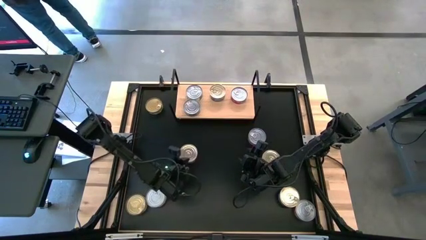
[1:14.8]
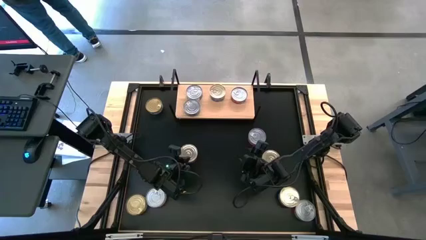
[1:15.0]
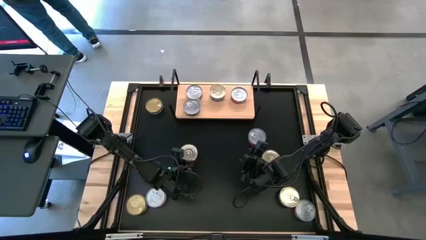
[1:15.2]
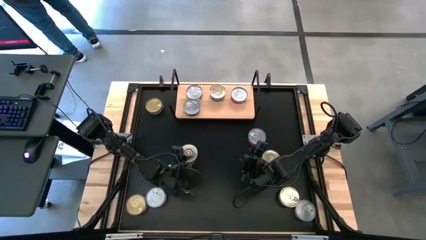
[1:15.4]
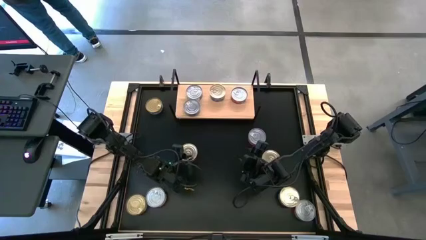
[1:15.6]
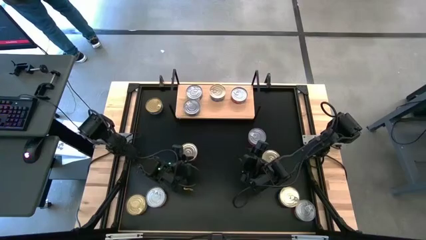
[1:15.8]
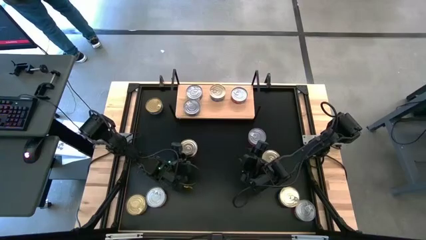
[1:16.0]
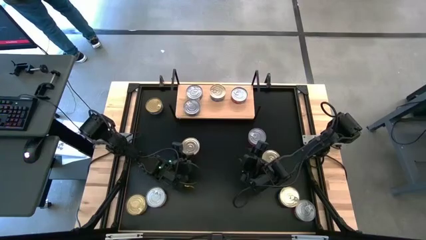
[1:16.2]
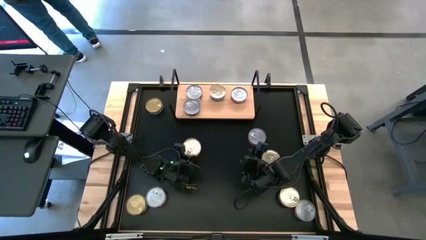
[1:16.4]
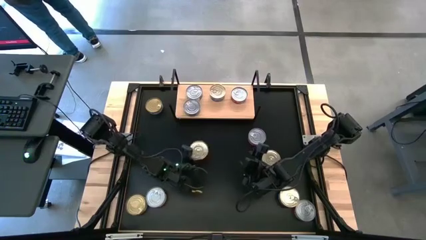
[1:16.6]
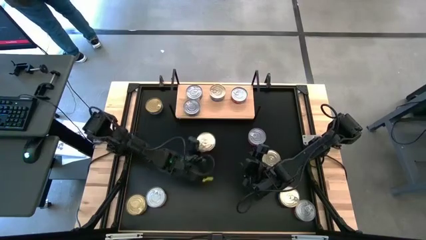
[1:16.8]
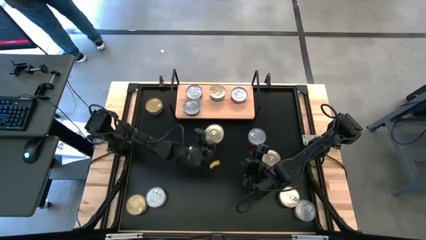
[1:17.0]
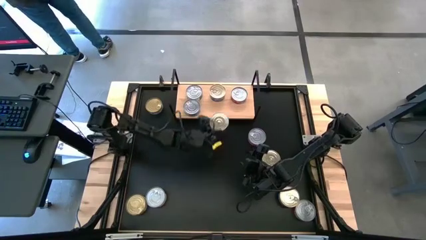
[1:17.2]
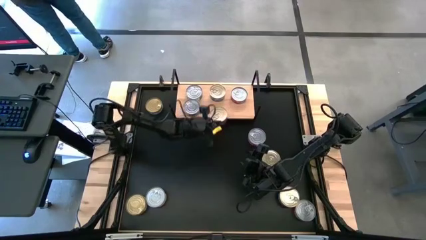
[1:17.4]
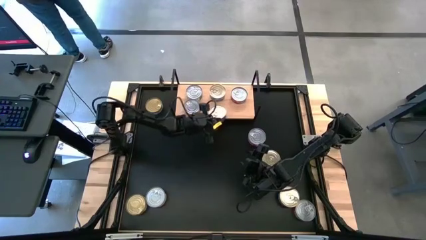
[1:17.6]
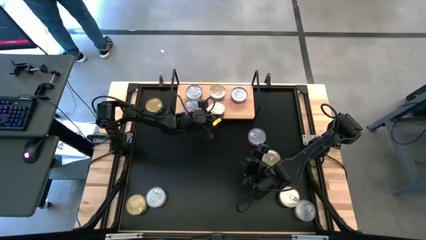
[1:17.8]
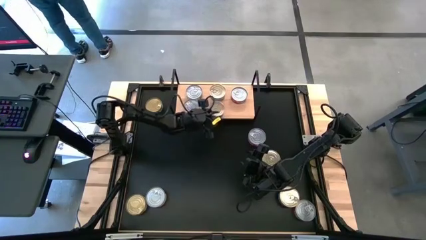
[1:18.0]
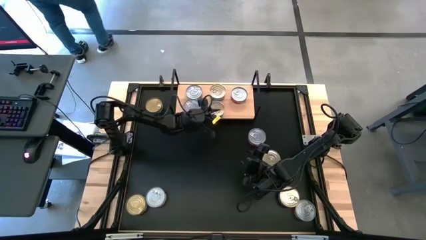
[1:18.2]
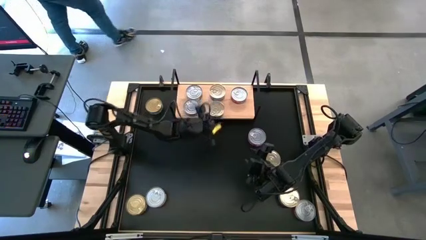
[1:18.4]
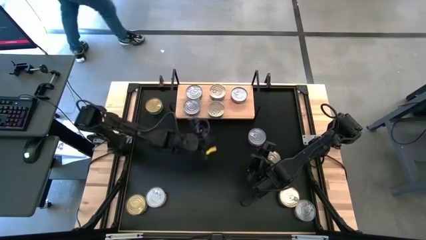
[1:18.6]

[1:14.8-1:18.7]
Task: Stack canned seafood by type on shelf
Put the blue-pink tuna can on the shelf

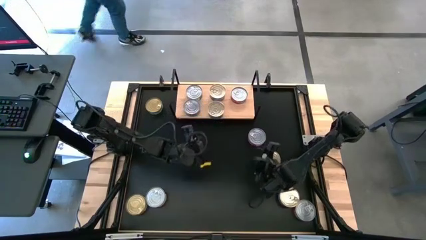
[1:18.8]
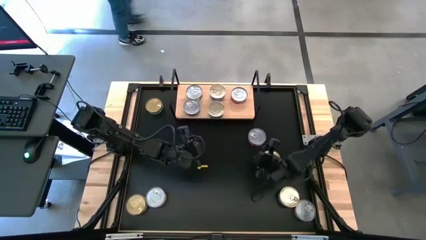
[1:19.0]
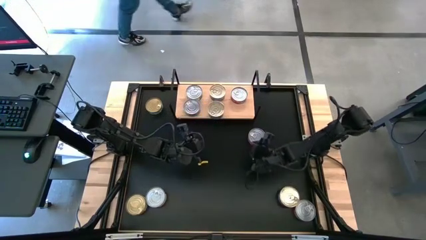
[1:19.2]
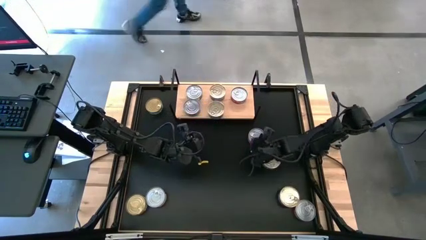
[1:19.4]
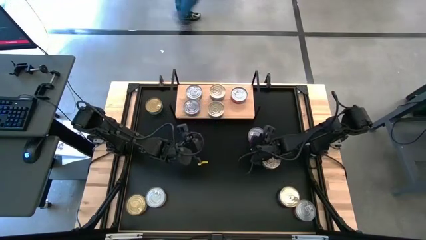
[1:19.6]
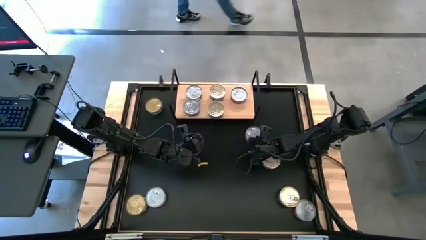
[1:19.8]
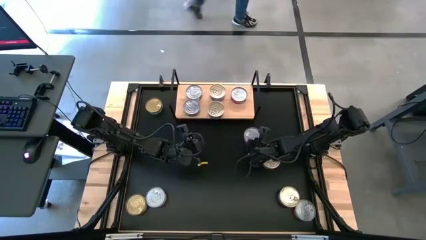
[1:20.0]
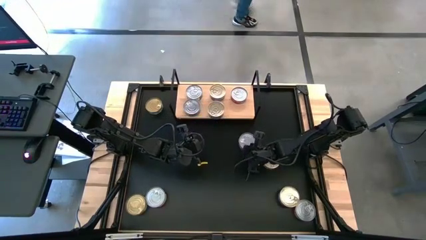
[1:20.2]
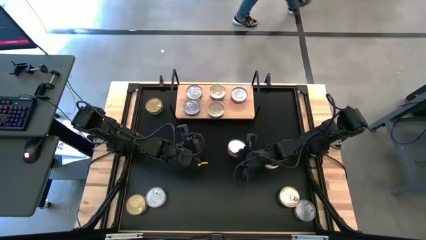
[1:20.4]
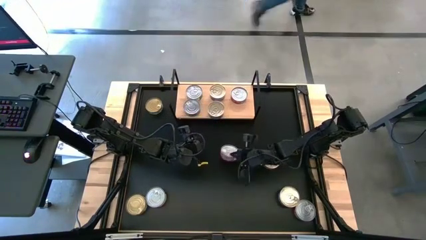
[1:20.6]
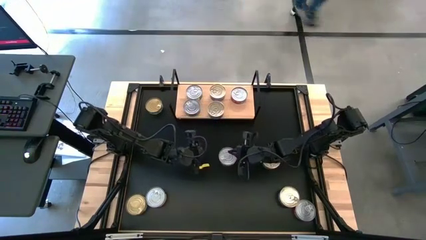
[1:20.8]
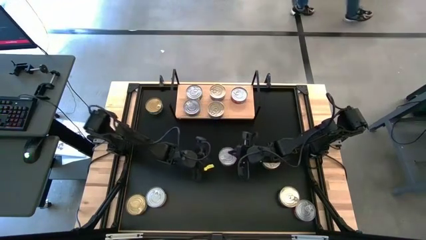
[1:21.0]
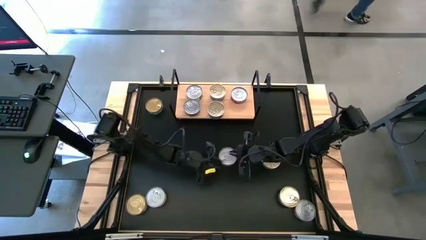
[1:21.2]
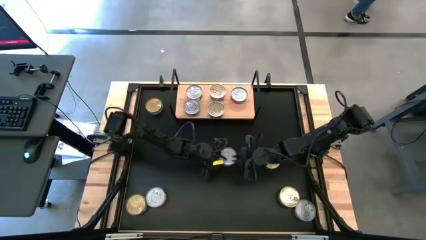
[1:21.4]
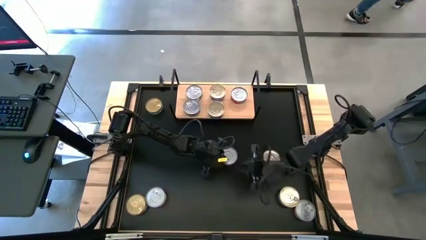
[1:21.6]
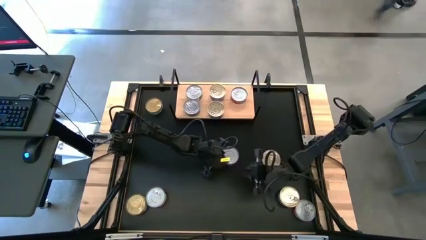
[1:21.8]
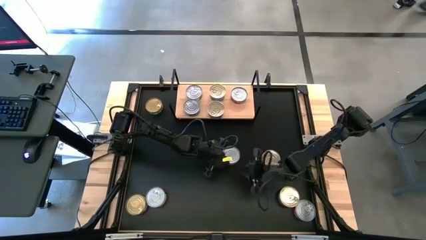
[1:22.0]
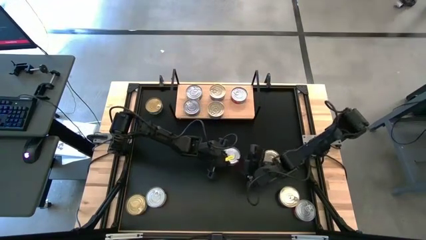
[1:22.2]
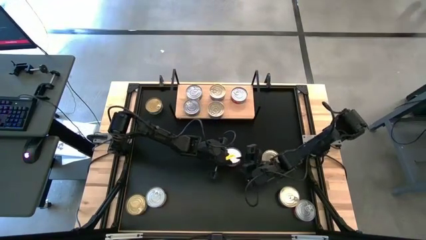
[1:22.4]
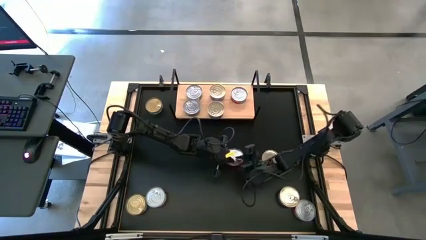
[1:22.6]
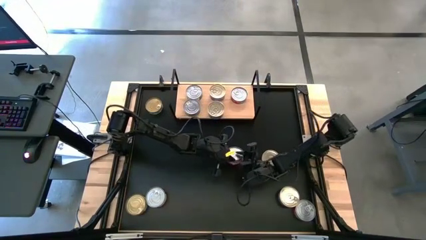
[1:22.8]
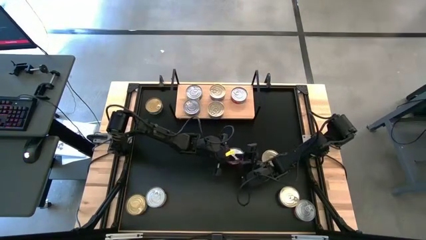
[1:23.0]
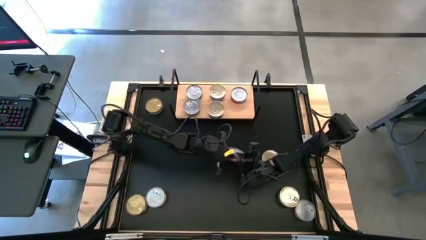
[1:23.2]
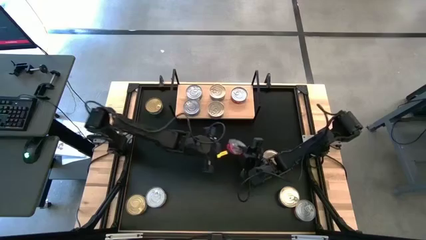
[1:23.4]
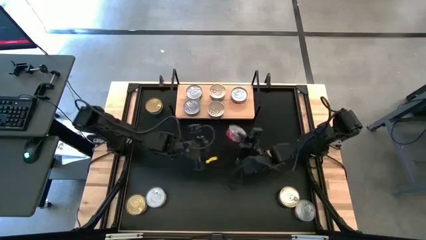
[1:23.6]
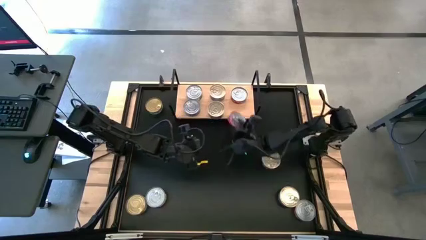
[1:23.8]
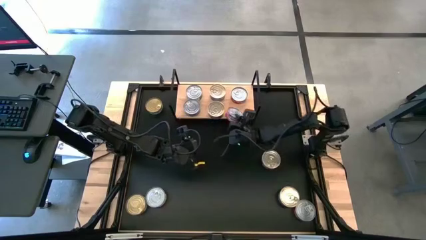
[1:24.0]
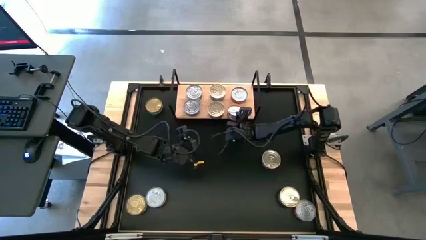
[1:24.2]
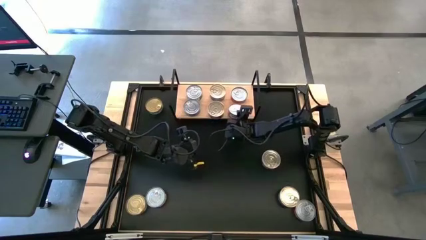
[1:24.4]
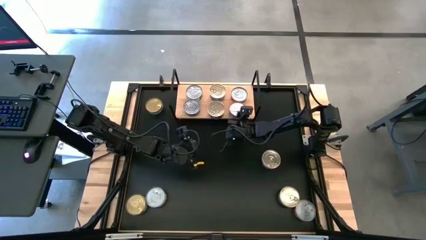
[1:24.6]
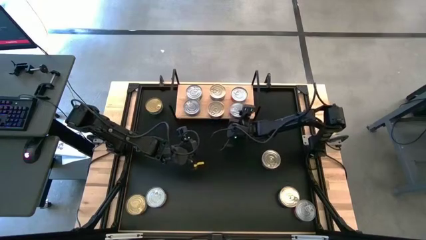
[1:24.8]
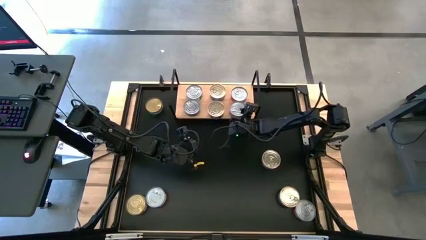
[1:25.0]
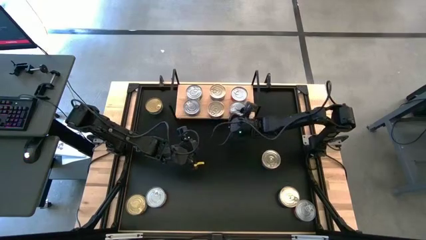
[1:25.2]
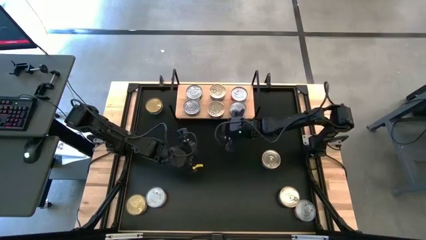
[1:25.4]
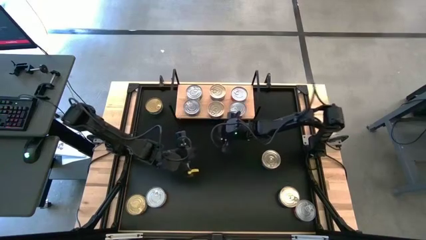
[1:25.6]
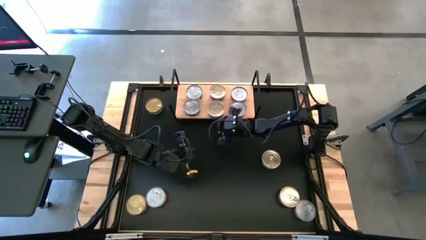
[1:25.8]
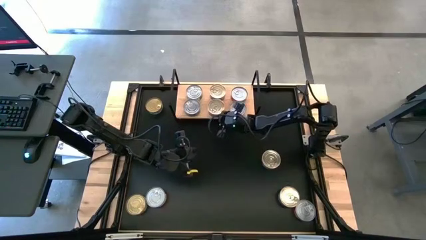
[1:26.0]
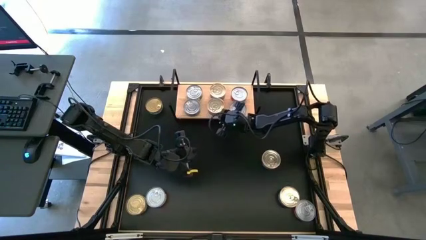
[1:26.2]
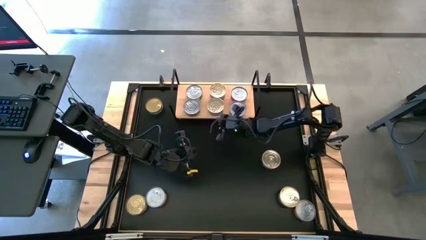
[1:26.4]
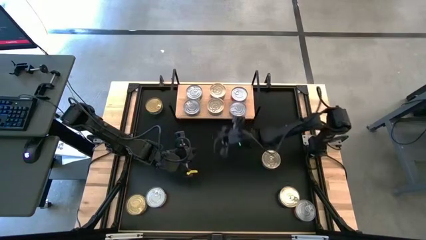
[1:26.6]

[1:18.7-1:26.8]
Put the red tuna can on the shelf

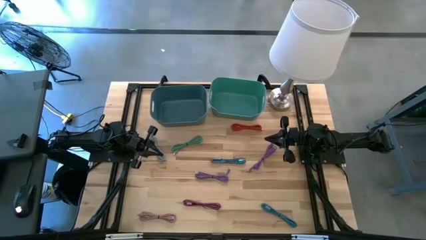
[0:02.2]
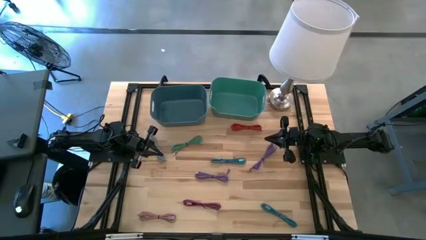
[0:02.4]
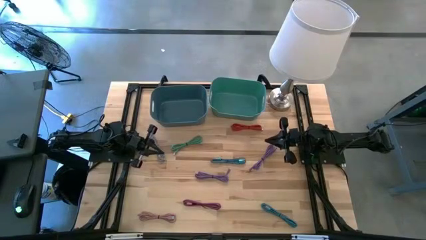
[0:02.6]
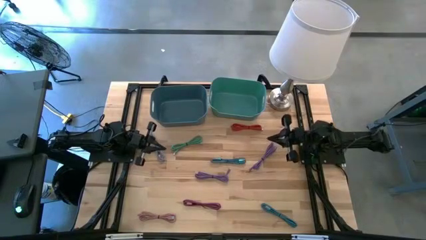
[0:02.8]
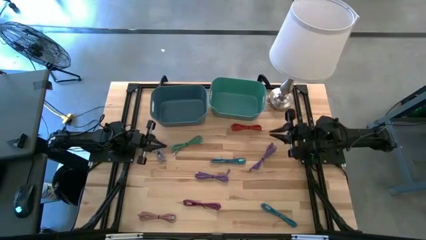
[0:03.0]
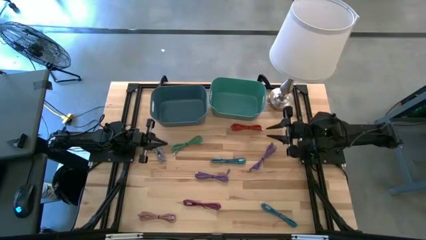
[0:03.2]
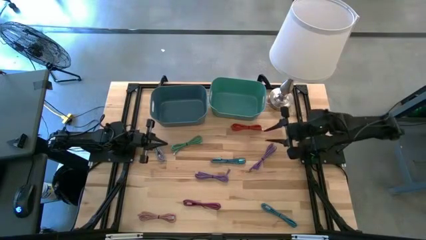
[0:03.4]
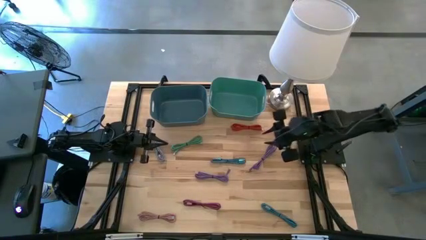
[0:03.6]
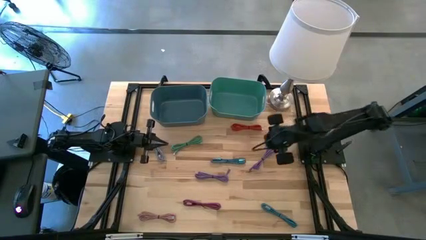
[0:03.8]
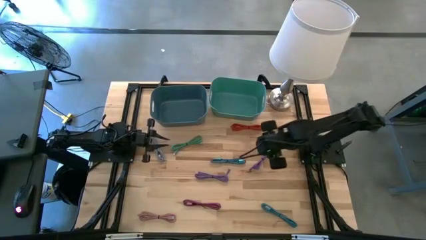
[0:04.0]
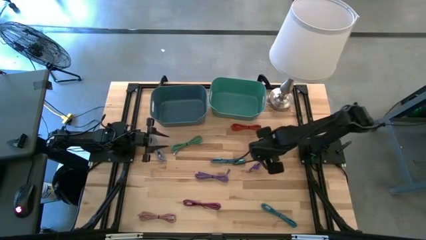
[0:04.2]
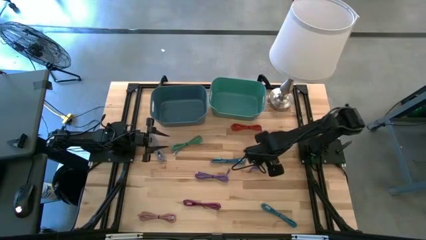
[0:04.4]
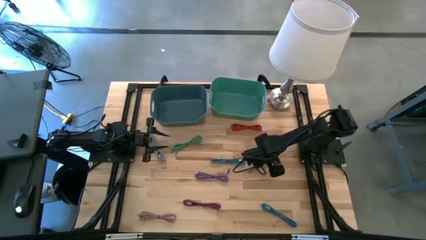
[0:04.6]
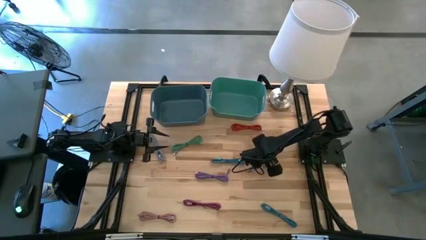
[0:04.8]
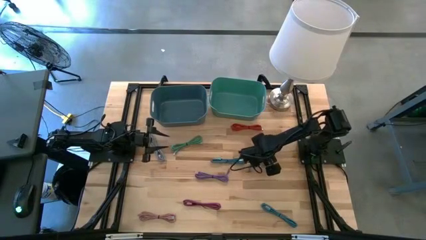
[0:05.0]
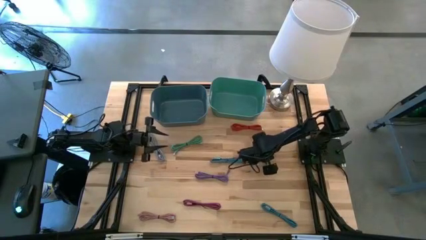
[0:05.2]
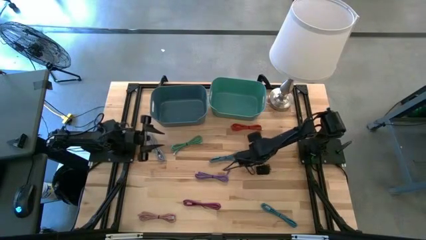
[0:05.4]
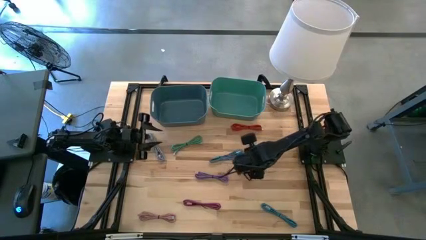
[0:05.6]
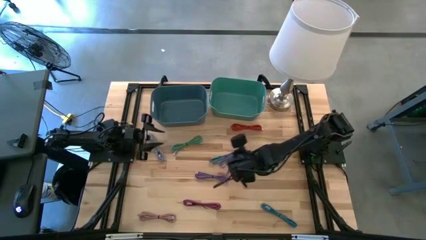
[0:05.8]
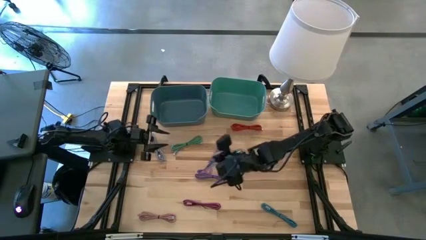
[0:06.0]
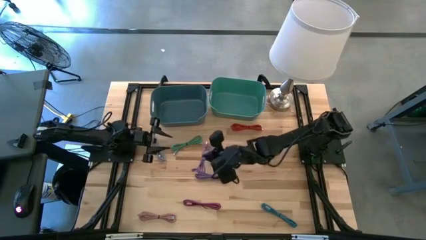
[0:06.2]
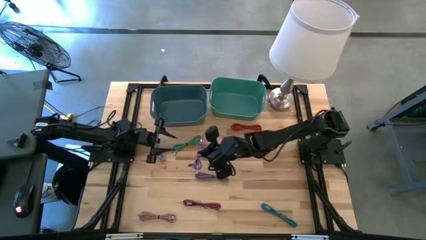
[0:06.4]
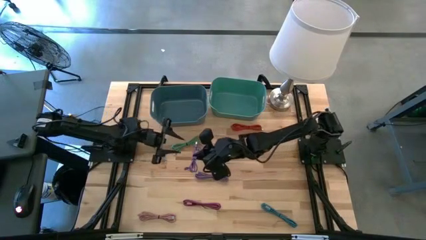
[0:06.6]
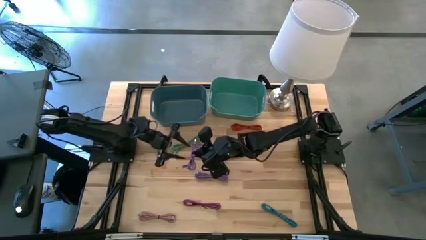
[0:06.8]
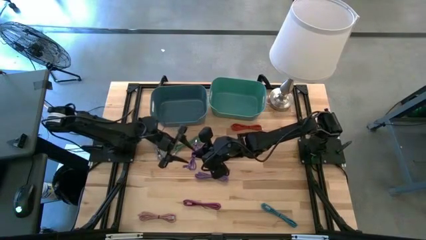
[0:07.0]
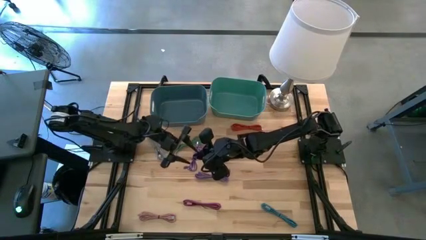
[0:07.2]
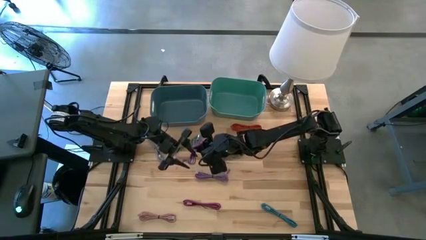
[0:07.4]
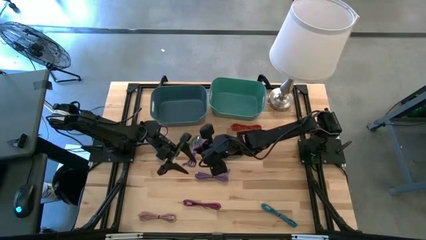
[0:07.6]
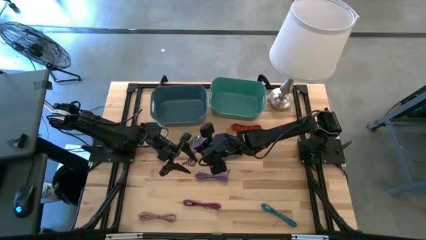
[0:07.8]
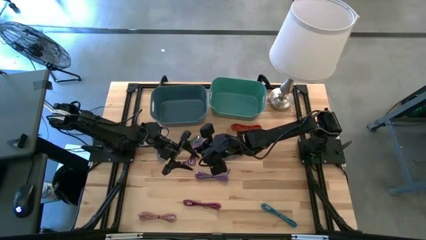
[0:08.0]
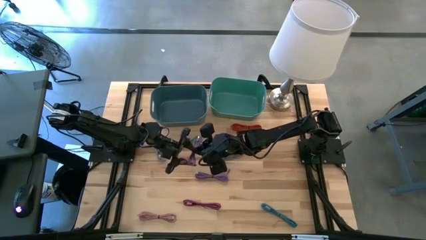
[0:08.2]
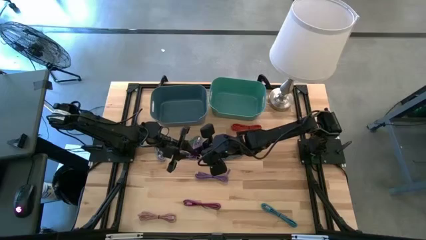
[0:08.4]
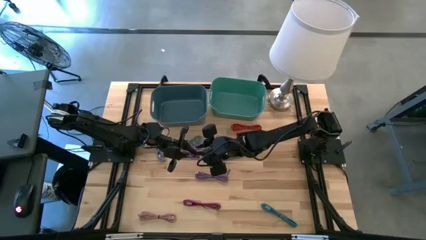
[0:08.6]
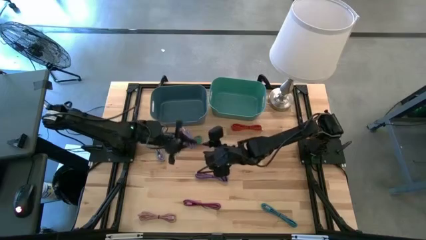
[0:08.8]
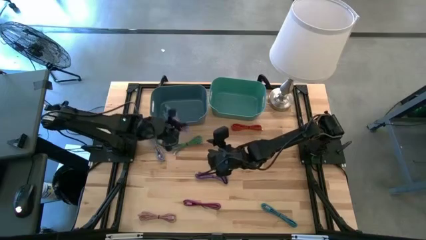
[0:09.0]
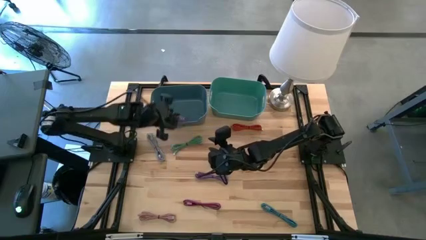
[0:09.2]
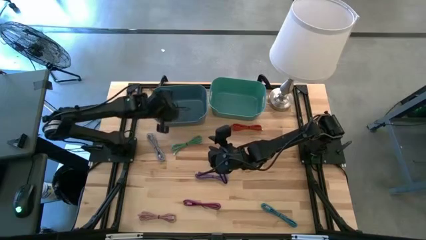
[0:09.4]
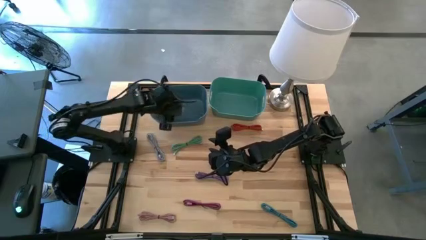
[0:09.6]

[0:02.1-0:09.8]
Task: Pick & Place USB Port
Put the purple charger cable into the blue bin
